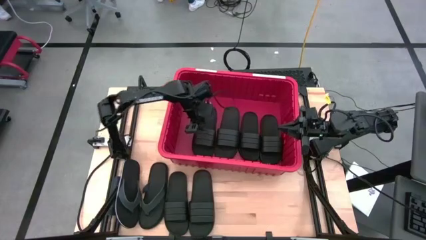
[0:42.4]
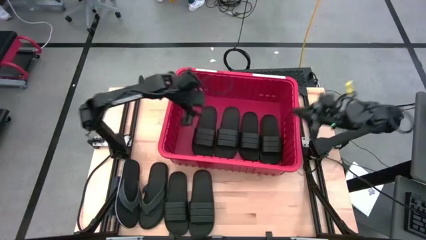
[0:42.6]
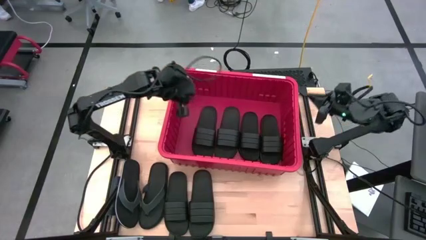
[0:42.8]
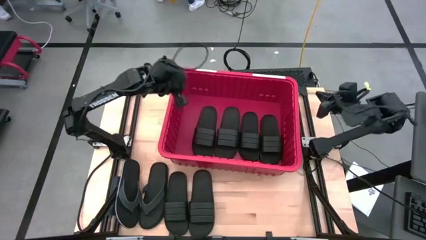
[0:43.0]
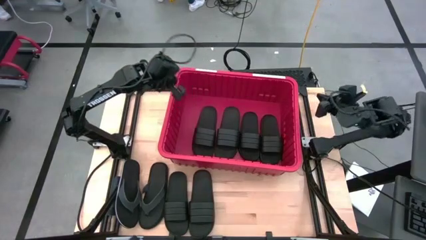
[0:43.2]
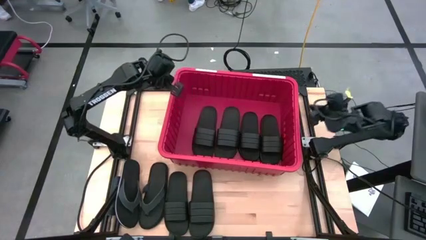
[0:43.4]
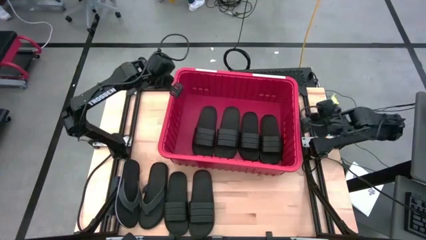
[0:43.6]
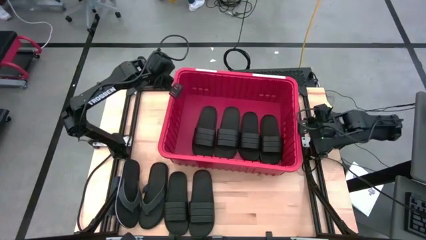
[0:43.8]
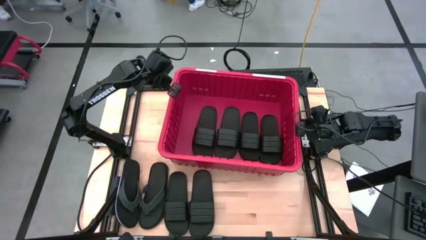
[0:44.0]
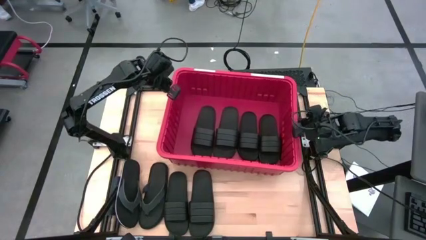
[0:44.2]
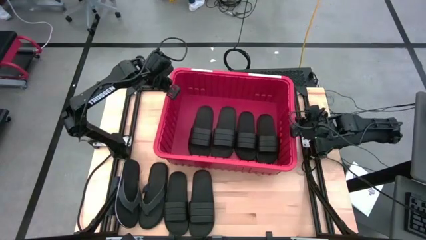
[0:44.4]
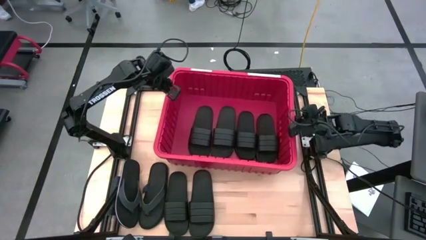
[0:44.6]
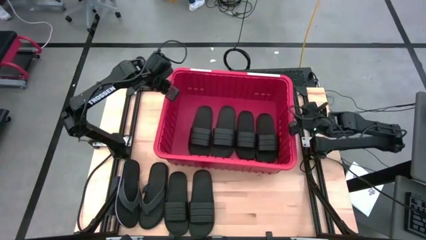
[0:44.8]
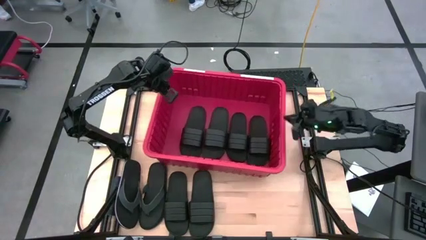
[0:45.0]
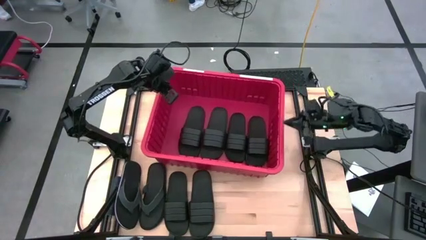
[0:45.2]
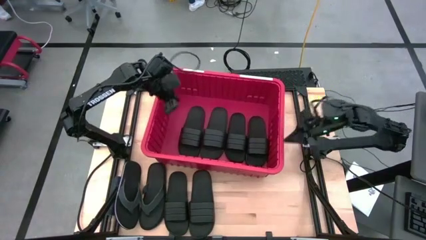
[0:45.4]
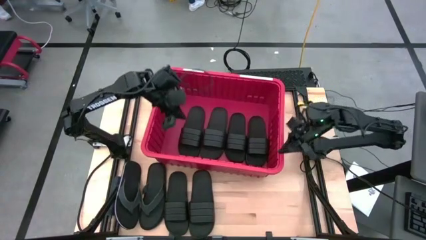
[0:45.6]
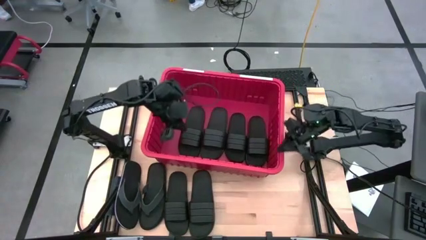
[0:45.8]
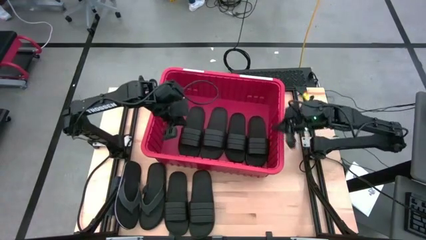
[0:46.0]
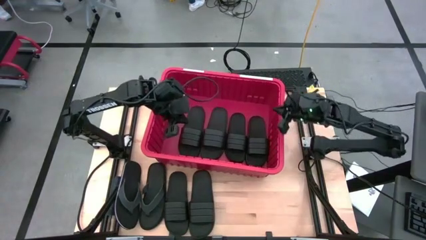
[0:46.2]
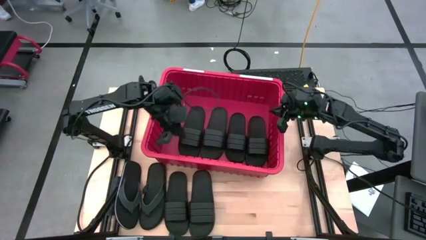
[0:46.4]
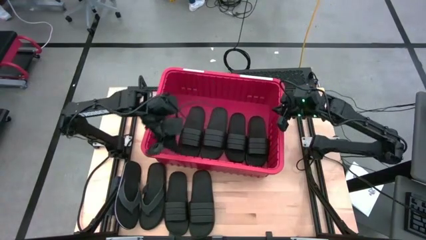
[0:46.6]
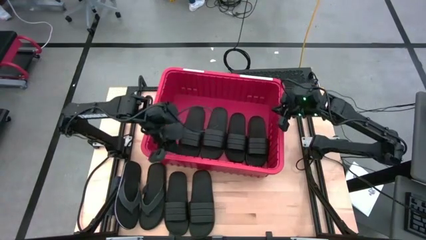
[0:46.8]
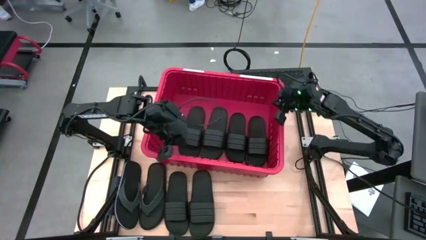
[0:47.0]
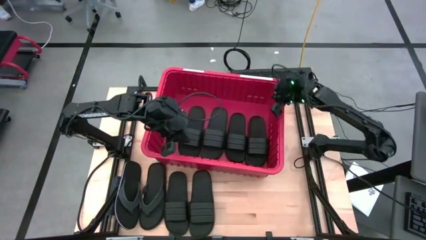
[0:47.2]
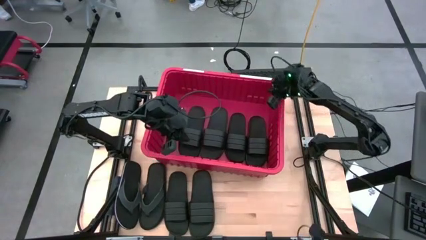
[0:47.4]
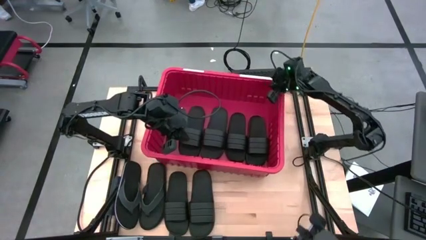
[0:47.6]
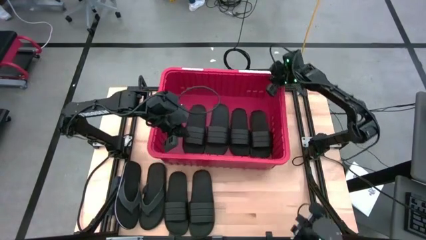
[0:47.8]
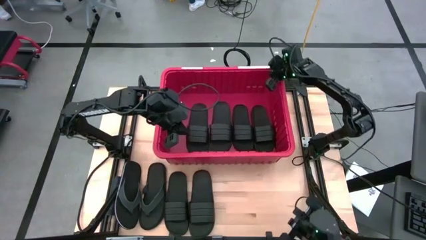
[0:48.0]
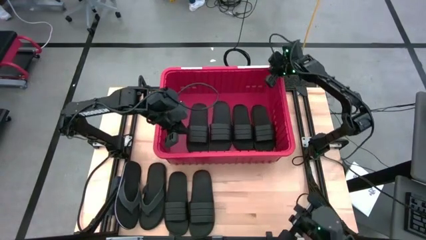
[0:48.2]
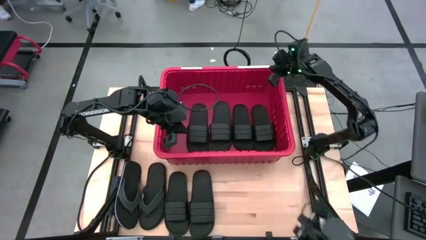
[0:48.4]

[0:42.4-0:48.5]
Task: Pick and place slides into bin
Adjust the red bin

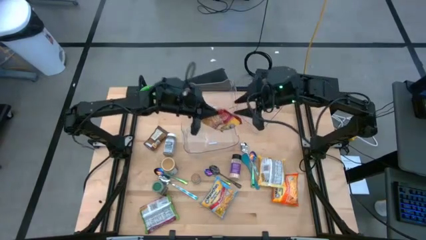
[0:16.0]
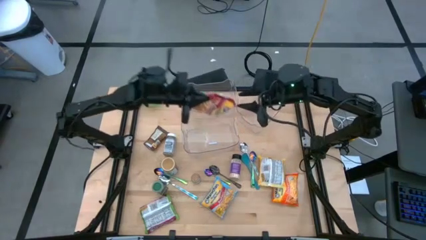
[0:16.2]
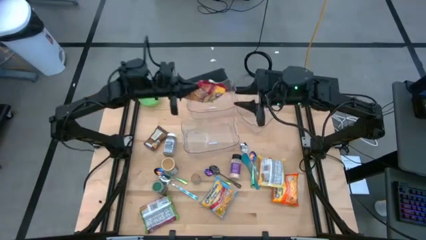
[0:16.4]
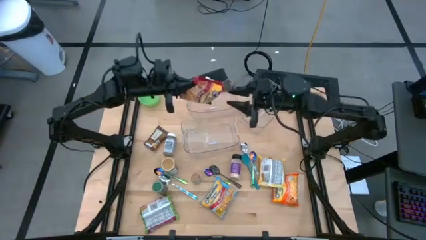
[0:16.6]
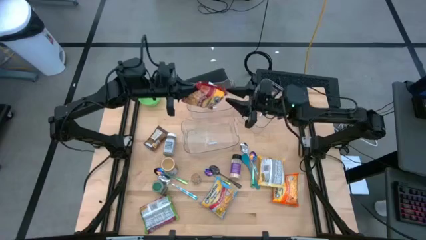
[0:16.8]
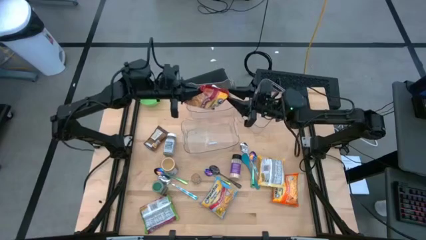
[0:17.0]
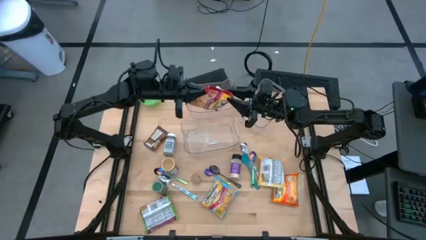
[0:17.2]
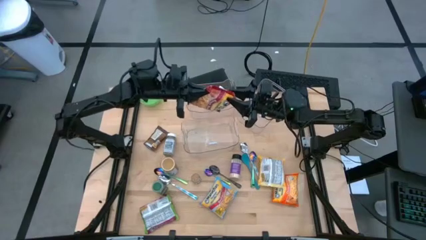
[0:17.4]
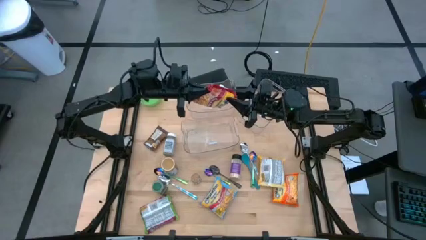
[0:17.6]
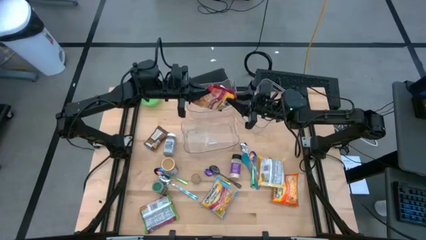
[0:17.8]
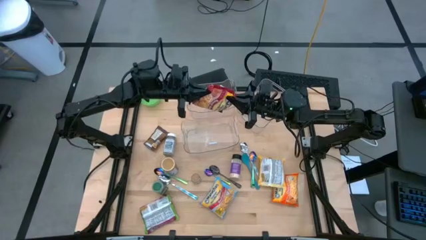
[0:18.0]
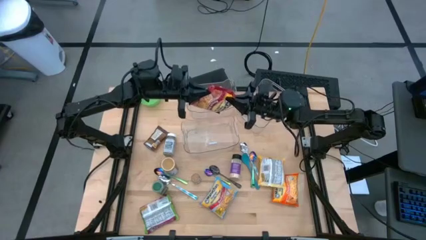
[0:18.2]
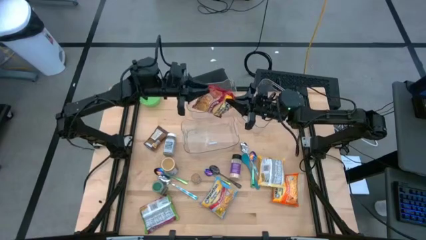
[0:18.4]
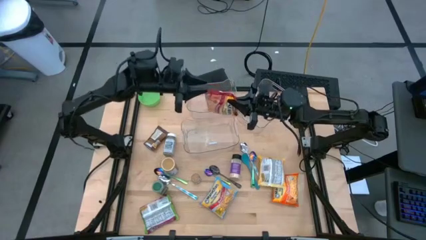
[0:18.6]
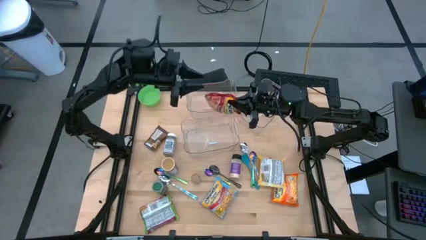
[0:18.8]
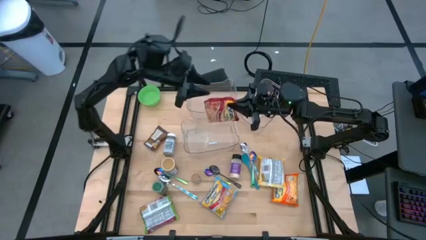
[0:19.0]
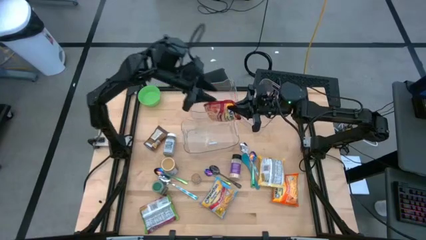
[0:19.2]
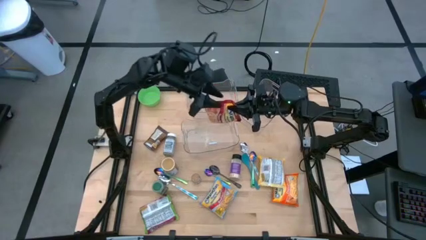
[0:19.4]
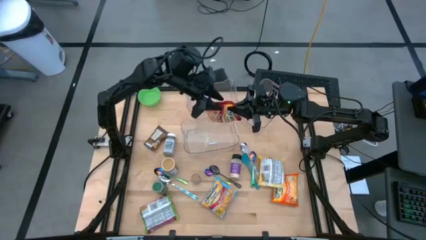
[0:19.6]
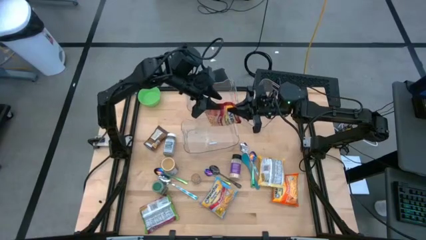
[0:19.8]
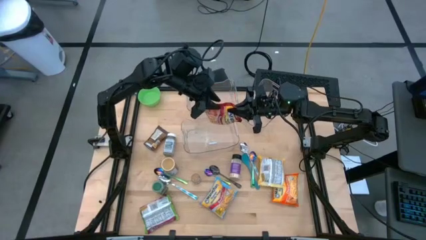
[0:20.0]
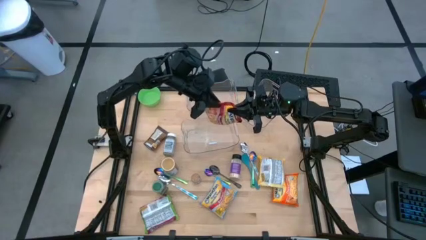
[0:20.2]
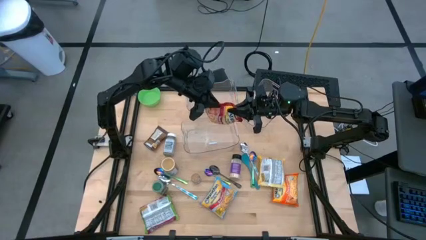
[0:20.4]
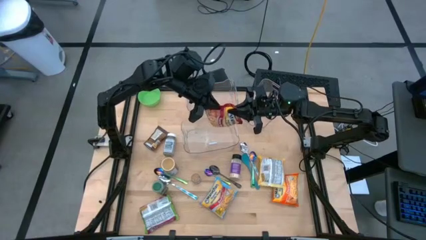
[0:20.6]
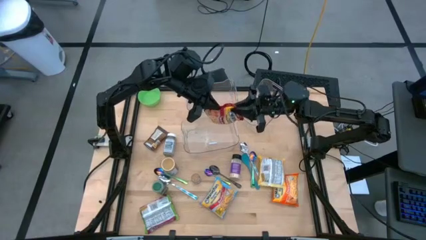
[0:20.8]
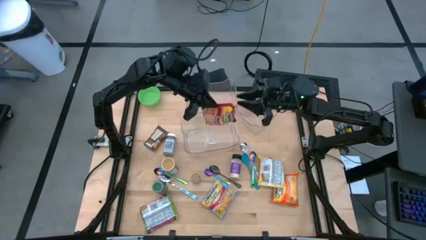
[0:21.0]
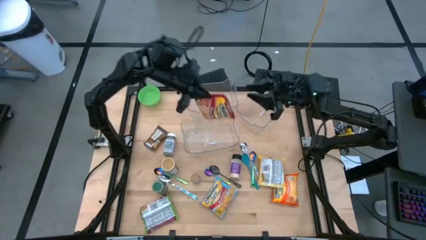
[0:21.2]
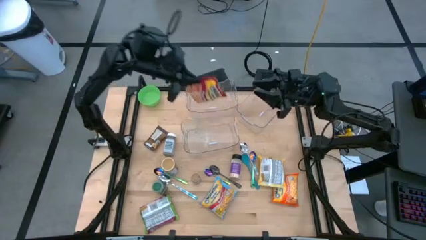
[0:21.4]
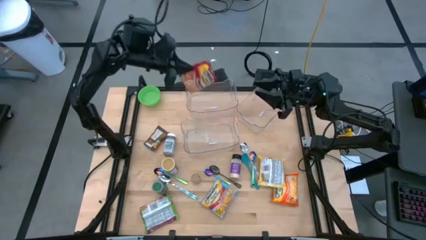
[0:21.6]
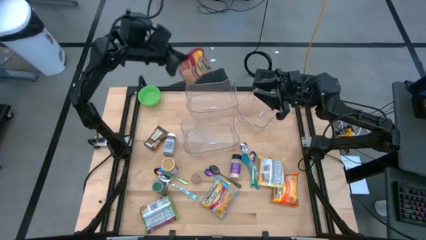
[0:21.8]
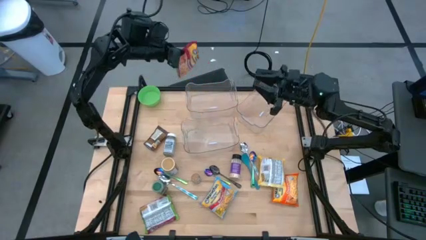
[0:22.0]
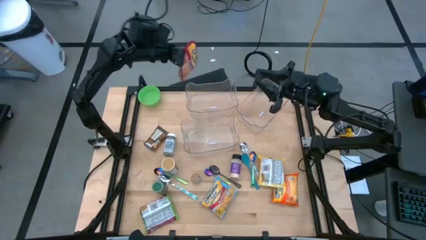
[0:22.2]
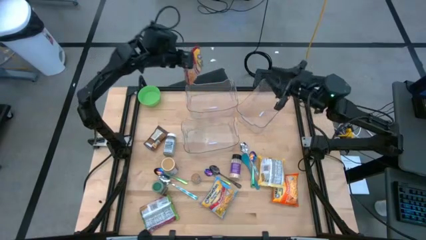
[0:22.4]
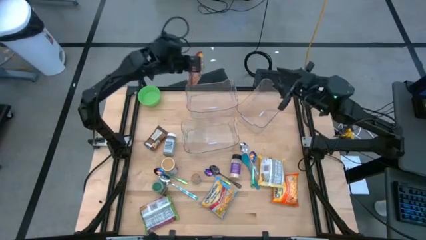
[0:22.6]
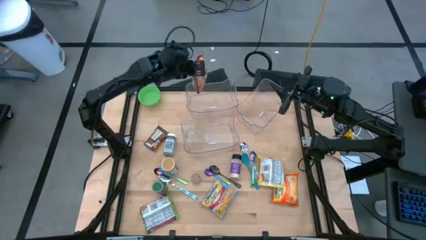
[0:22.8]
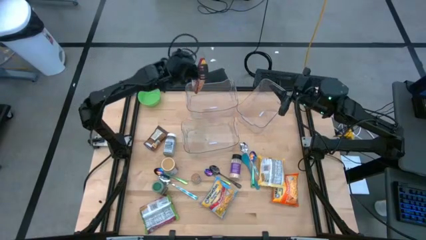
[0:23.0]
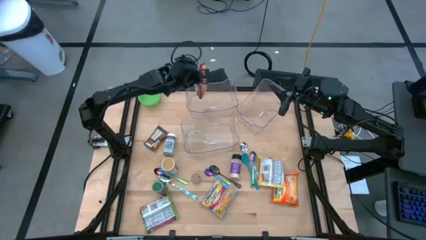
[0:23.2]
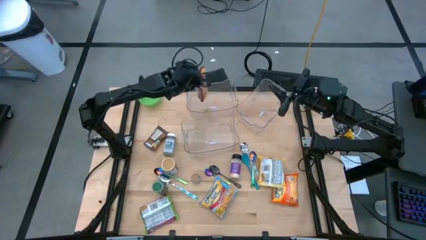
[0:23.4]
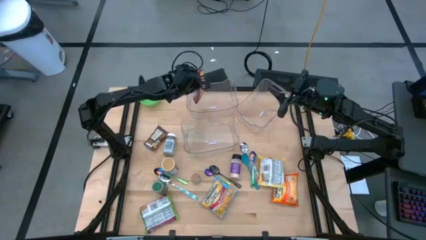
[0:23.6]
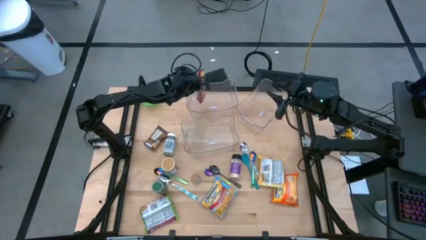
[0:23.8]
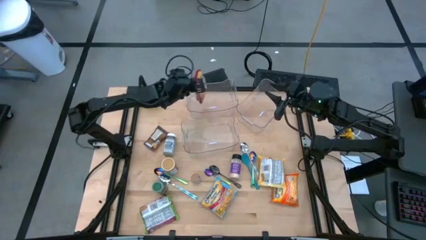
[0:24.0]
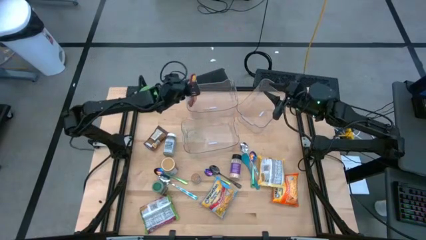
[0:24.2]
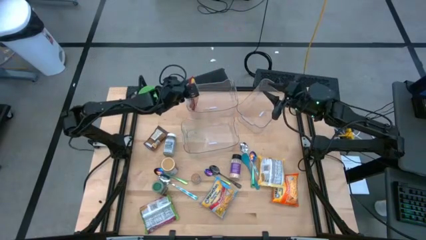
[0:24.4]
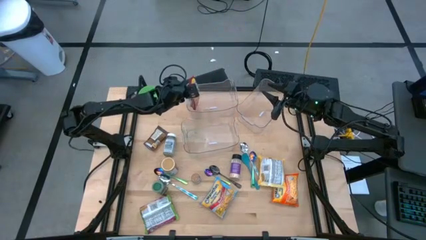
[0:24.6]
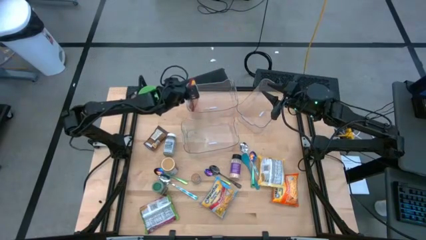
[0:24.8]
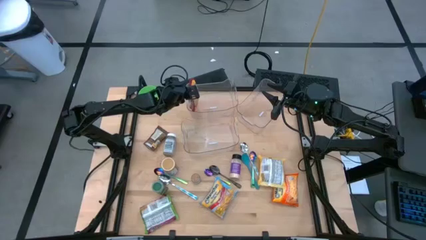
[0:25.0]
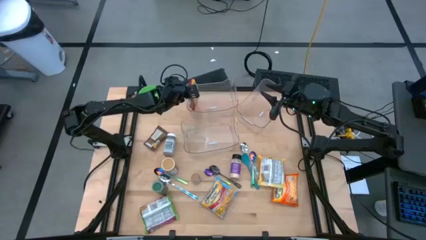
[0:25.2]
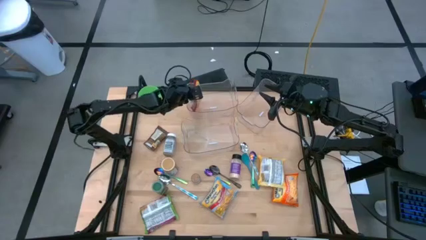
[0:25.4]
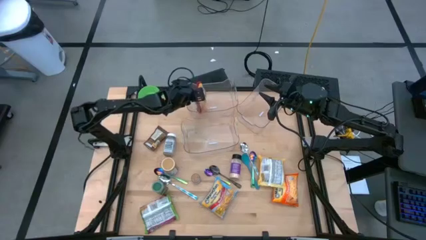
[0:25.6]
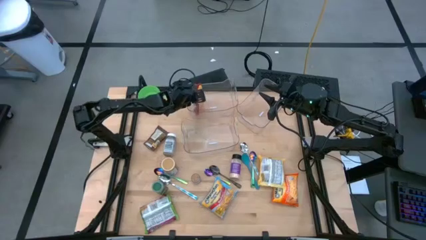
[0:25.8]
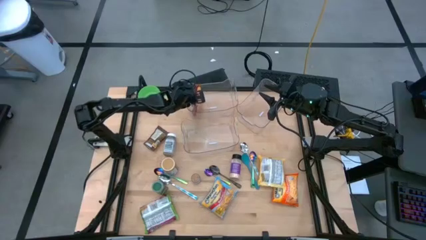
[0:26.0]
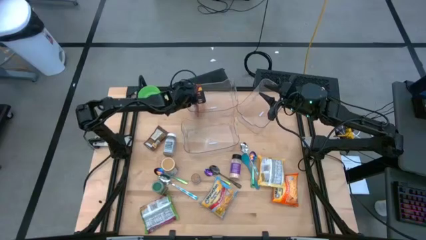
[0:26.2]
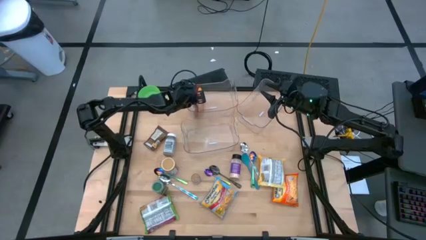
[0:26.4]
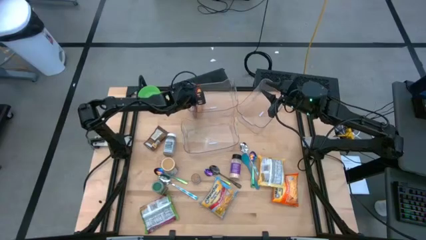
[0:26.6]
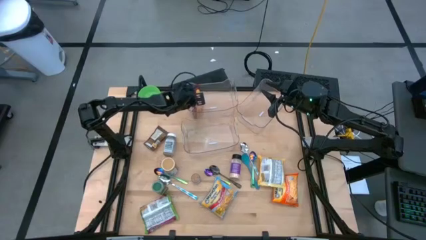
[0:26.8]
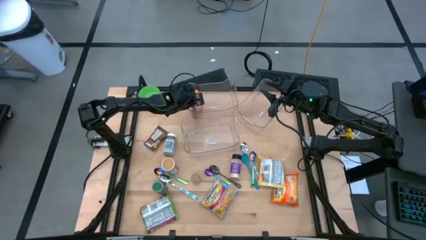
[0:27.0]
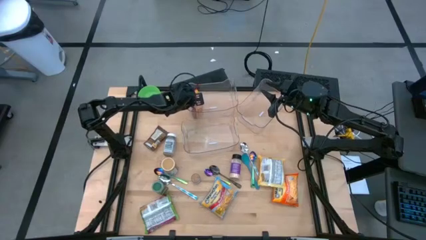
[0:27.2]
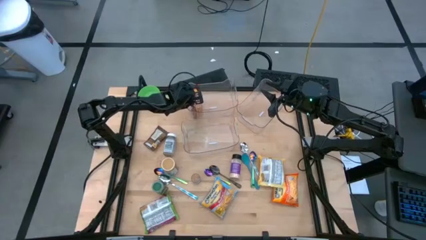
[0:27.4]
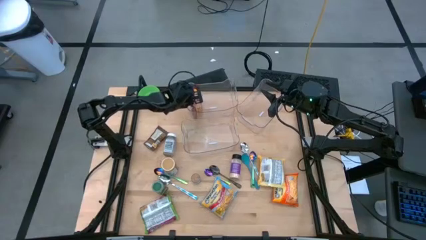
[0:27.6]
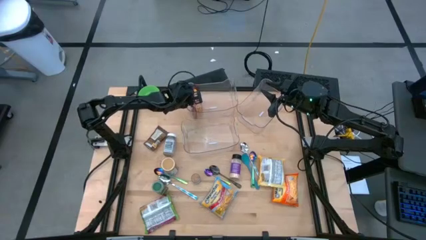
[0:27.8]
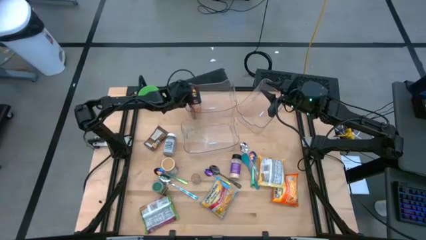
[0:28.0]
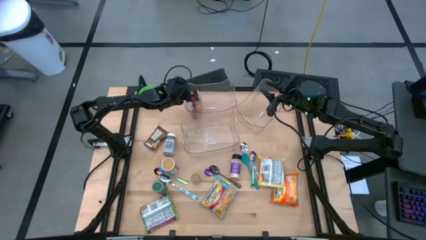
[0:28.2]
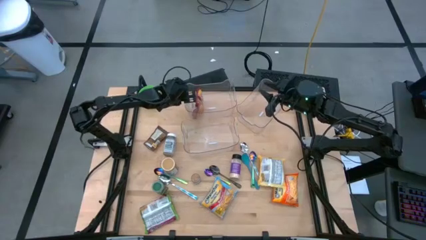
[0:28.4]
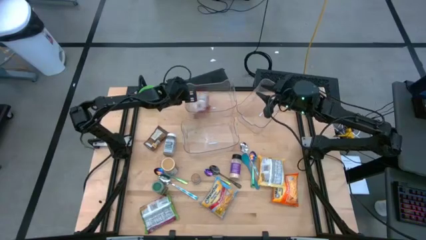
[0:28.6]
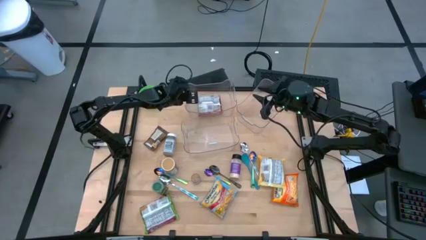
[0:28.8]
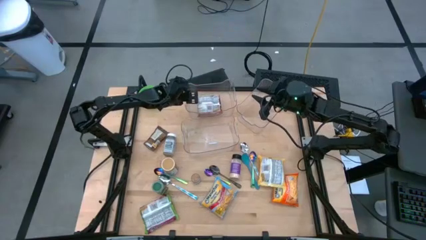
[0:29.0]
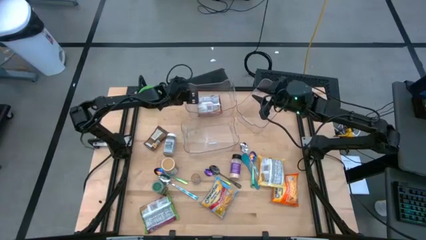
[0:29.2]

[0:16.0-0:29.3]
Task: Pick & Place Food Item
Put the red noodle pack into the top left transparent bin
